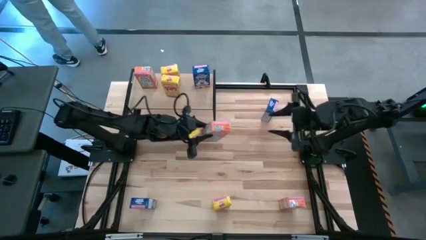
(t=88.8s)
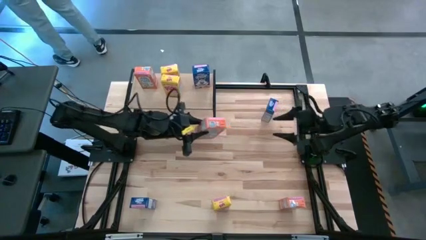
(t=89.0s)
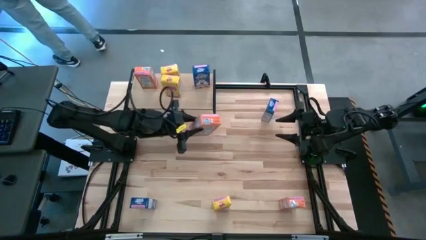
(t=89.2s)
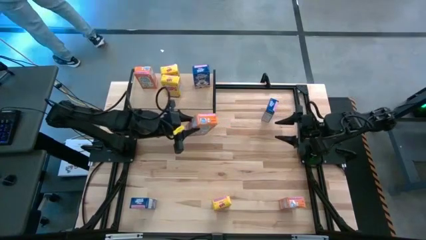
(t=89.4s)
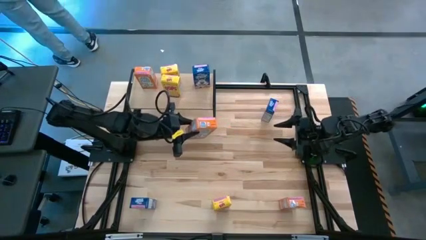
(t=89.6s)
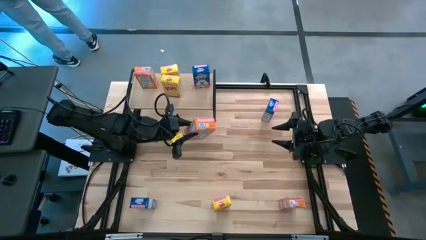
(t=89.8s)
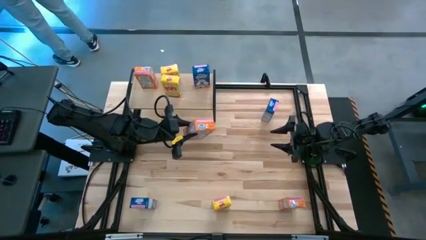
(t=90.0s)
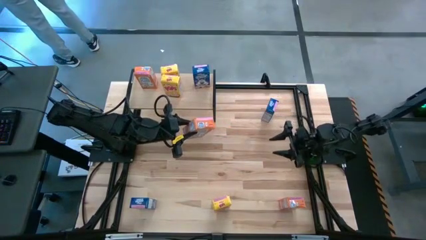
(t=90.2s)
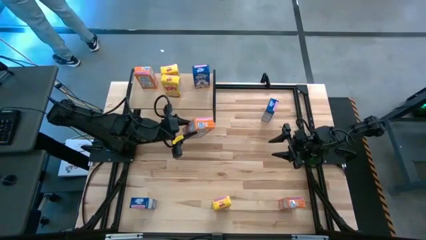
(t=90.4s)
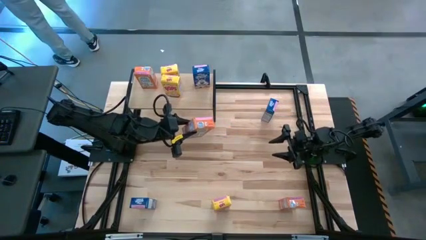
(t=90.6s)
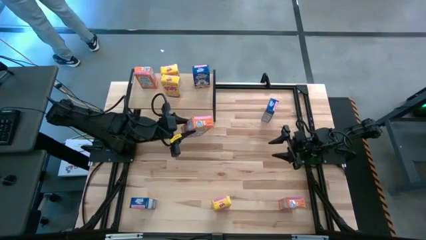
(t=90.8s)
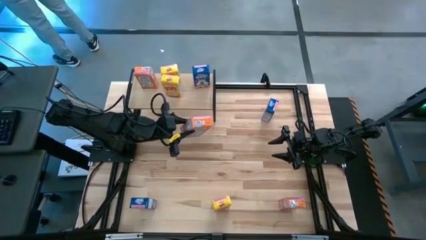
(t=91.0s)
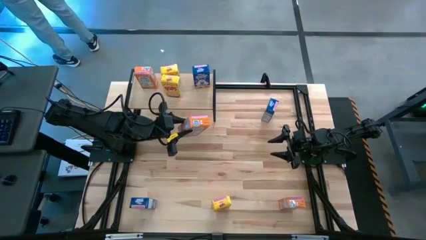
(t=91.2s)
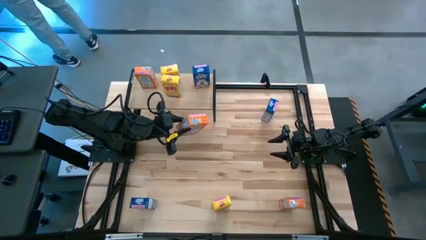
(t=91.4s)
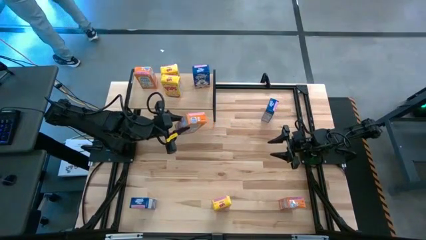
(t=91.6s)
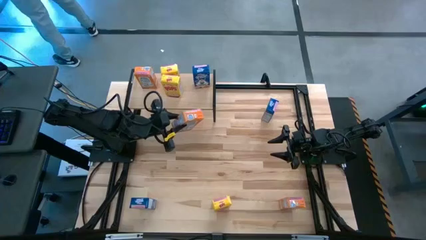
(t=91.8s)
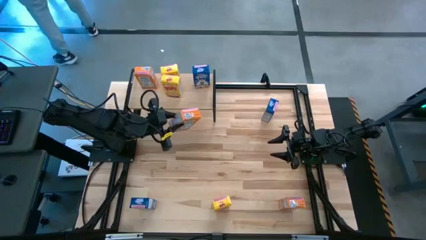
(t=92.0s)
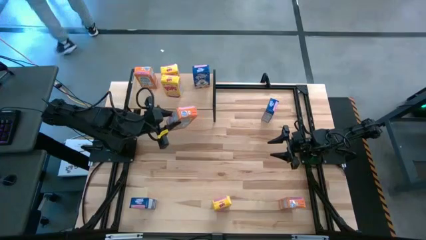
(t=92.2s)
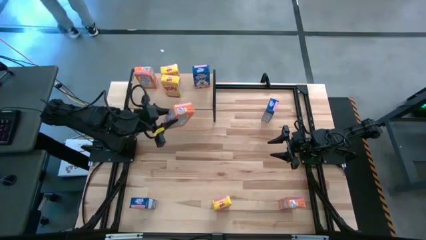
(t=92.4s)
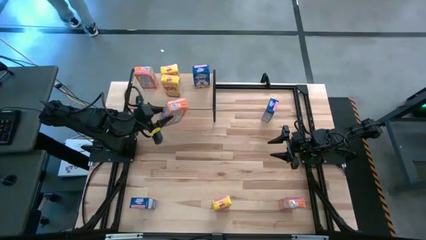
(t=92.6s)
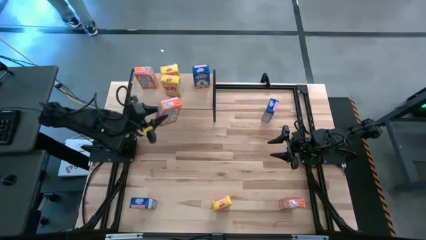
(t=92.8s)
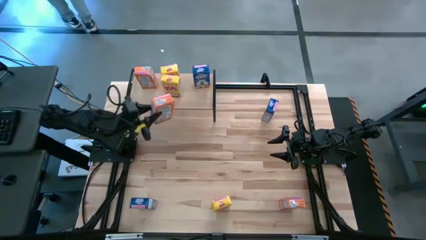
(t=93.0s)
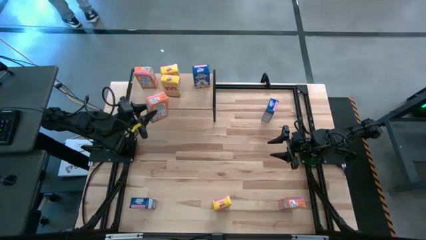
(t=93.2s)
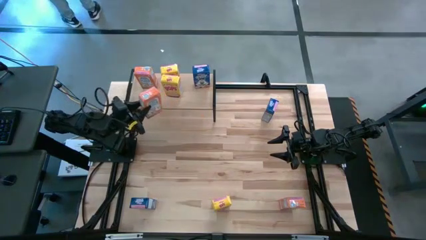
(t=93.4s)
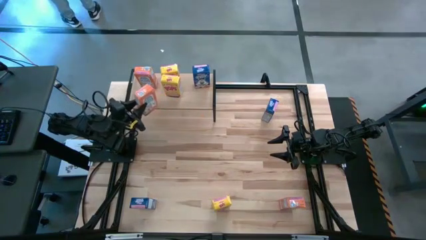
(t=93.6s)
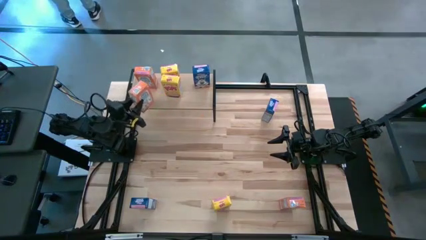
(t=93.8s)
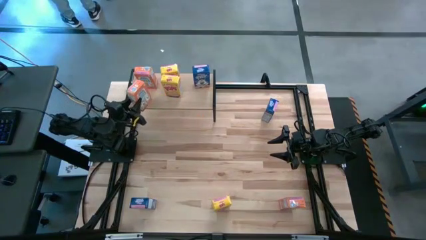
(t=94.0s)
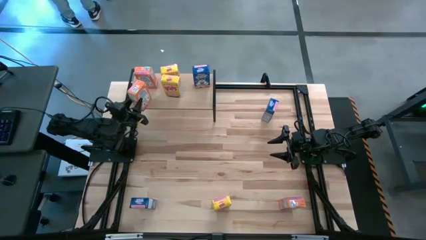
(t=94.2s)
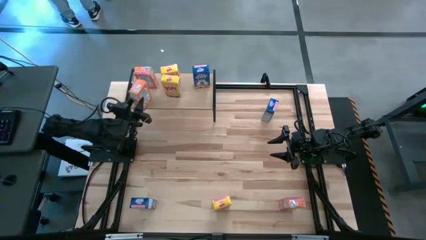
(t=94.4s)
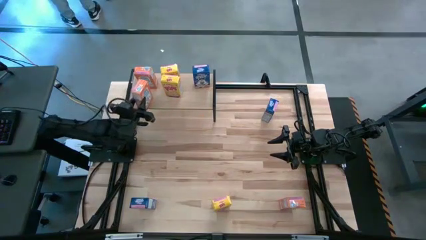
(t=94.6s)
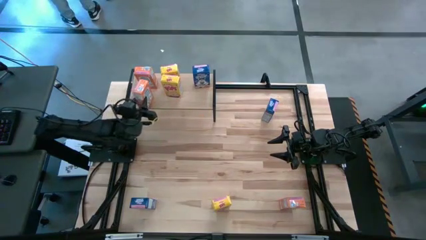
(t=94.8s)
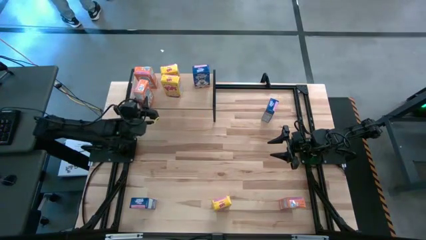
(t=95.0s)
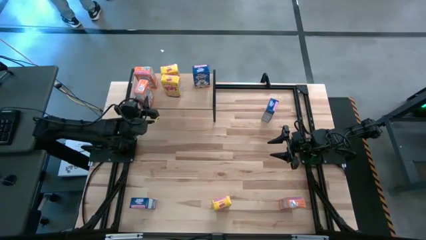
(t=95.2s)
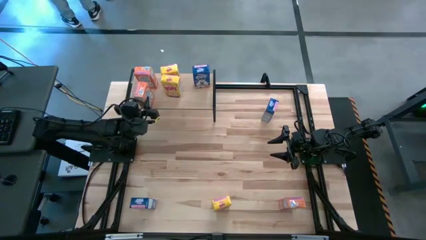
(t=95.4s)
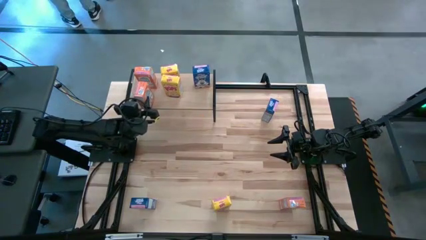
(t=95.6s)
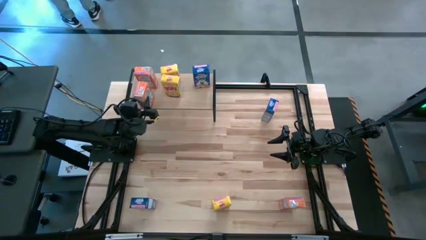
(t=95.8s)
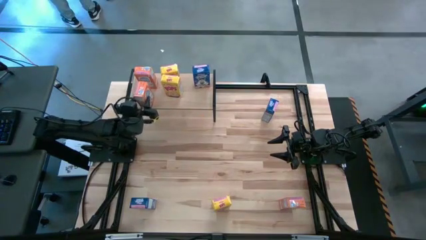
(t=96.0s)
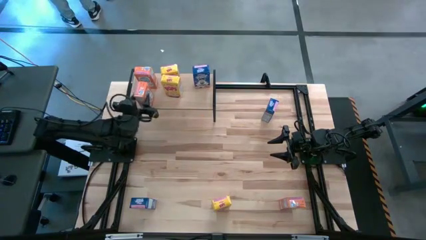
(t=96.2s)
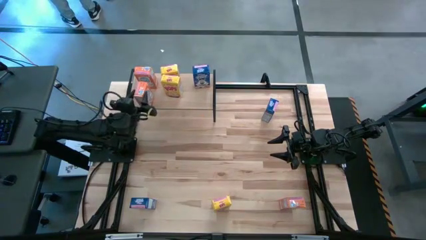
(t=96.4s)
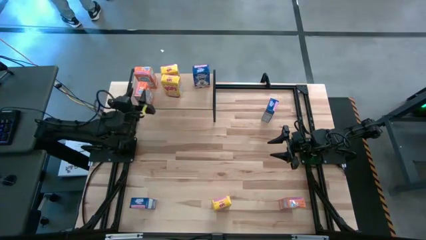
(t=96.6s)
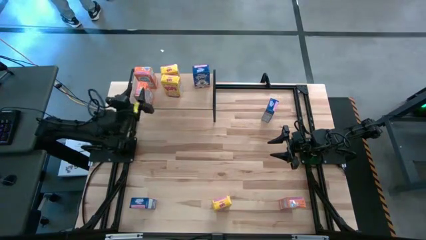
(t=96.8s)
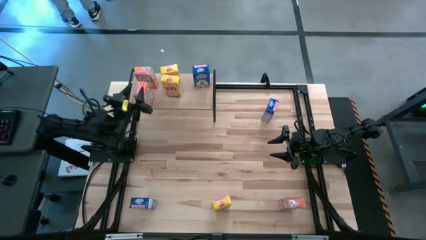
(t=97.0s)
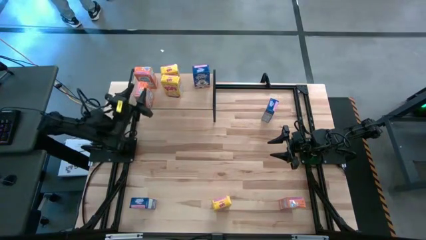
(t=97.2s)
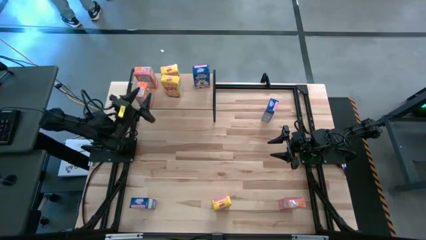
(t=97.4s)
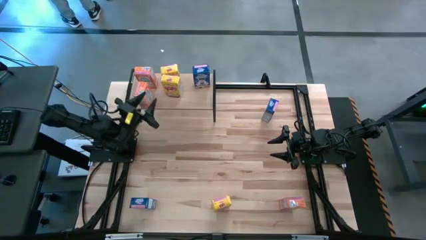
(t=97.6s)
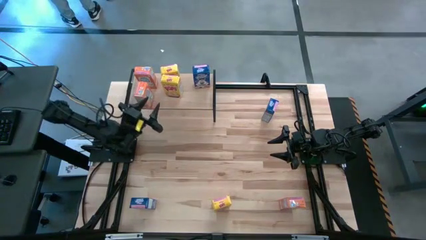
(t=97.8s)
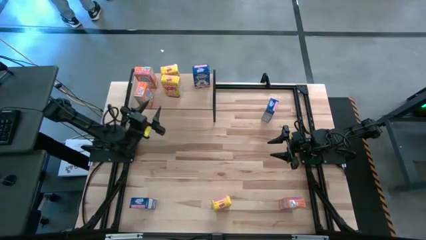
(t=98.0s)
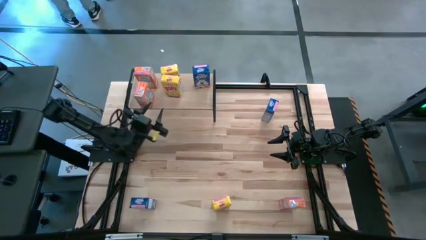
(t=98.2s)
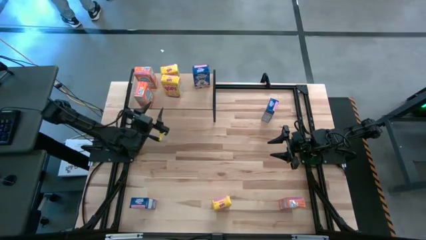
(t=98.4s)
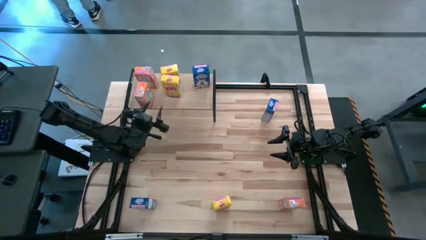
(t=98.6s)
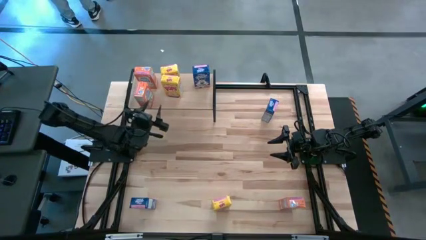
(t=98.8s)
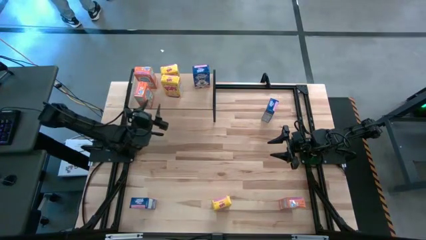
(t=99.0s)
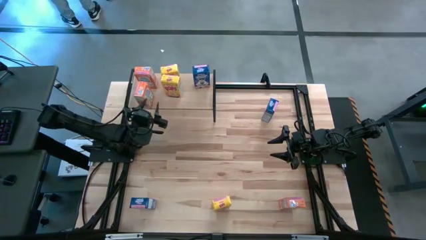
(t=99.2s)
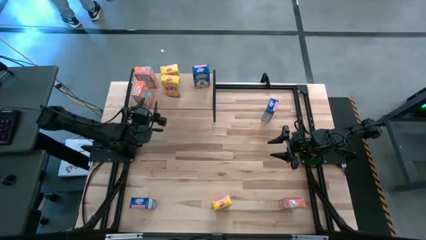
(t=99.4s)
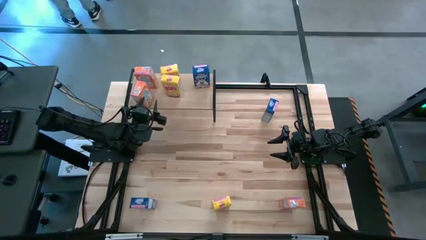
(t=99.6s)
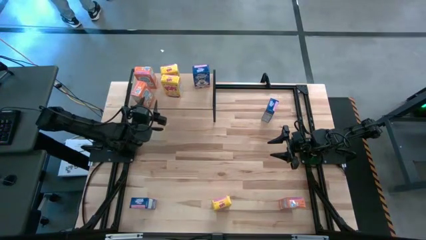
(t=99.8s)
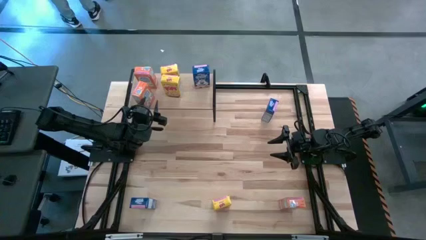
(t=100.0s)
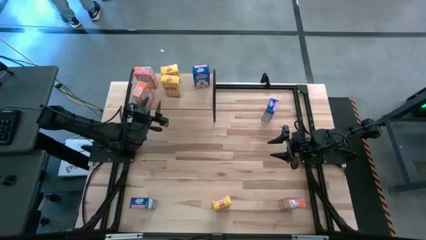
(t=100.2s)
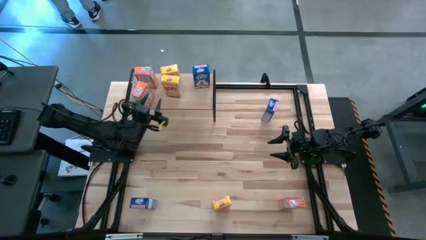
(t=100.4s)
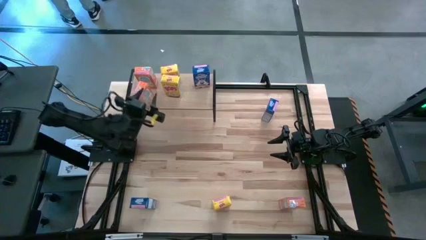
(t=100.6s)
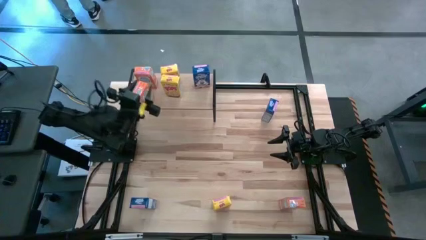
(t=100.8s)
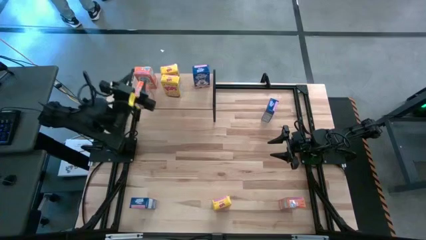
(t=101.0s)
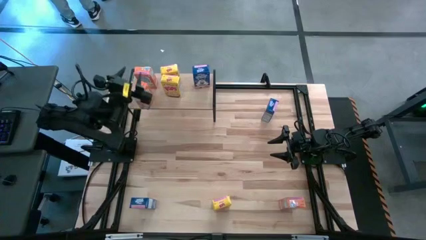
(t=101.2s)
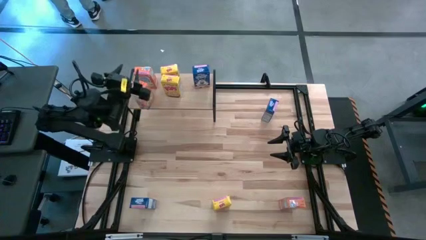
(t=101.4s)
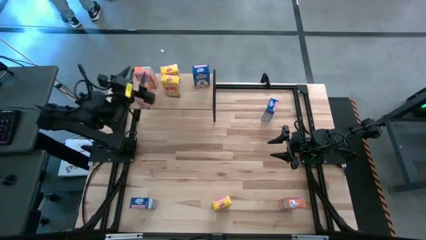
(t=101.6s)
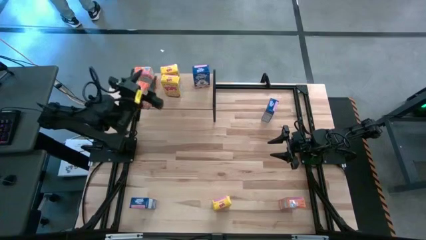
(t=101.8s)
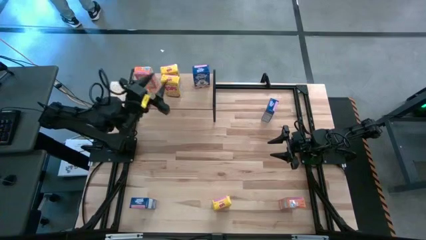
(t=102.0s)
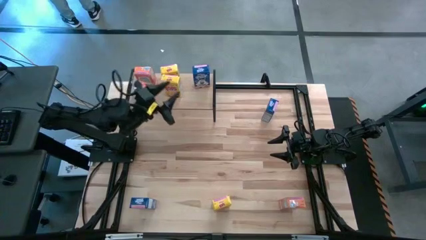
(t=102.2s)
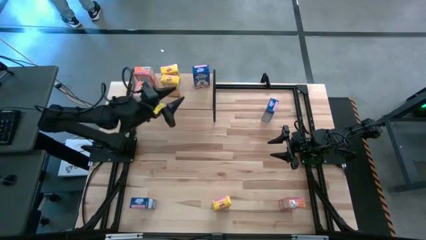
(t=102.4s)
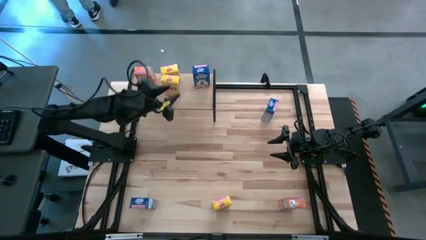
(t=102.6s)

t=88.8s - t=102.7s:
Task: Stack cereal on shelf
Put the top orange cereal box on the shelf aligned with the other orange cereal box
